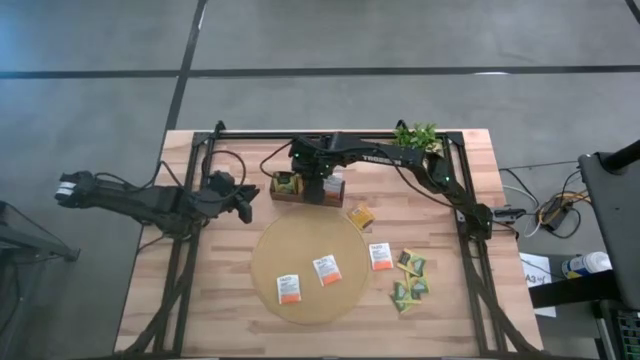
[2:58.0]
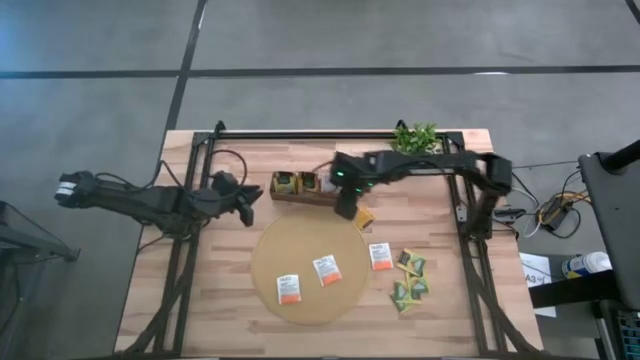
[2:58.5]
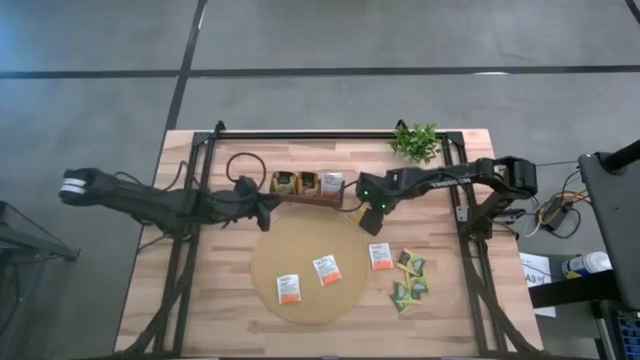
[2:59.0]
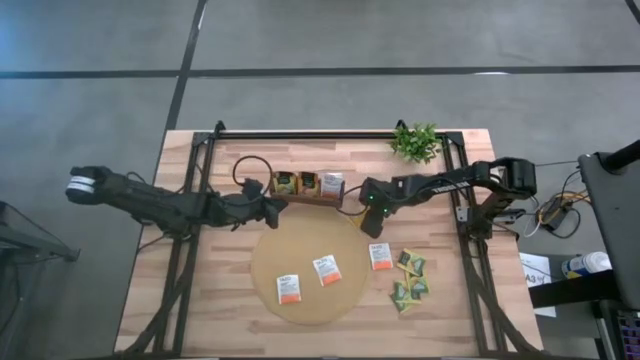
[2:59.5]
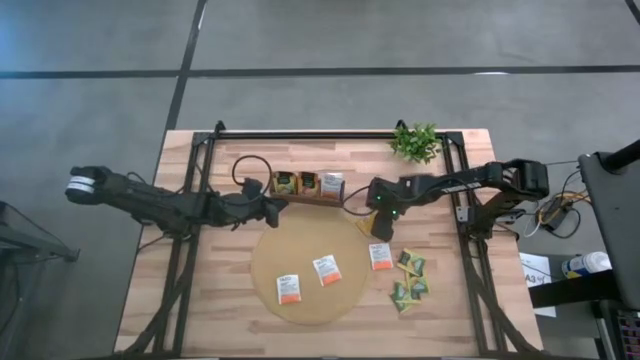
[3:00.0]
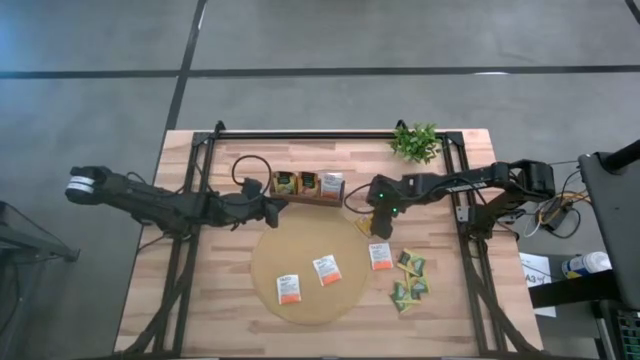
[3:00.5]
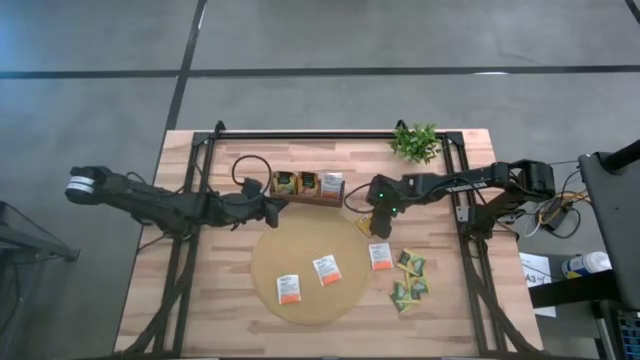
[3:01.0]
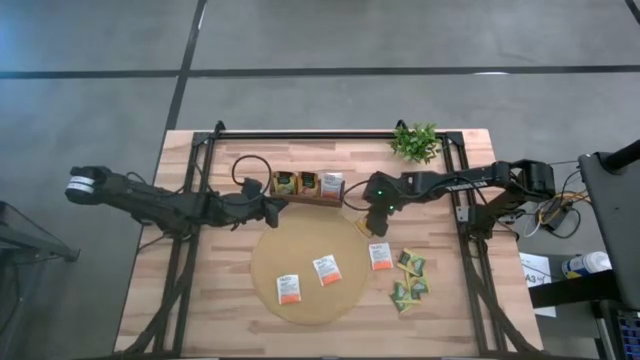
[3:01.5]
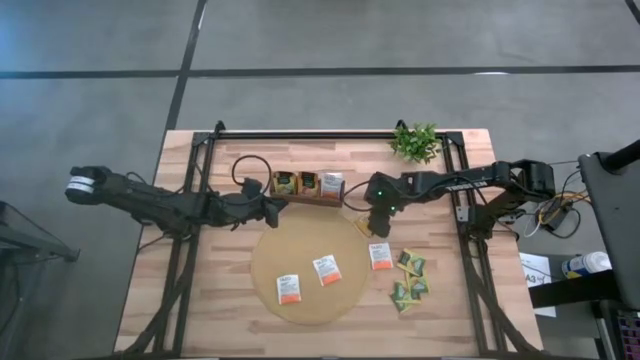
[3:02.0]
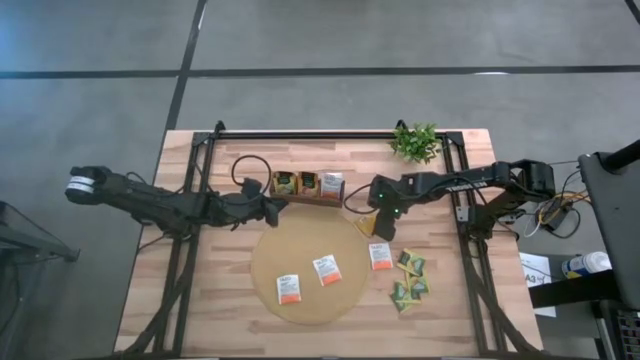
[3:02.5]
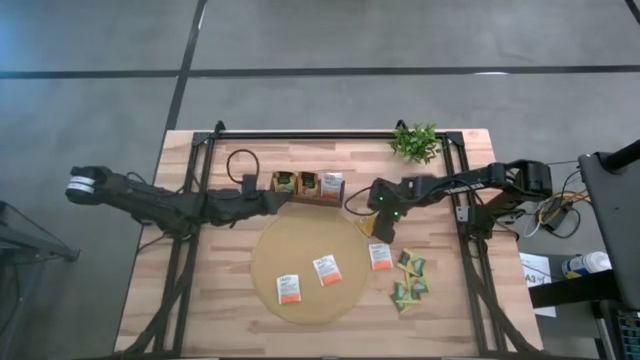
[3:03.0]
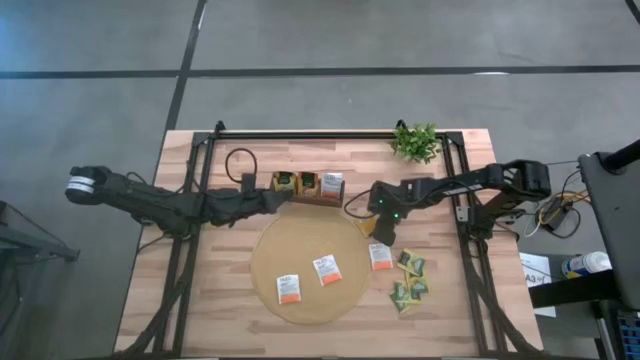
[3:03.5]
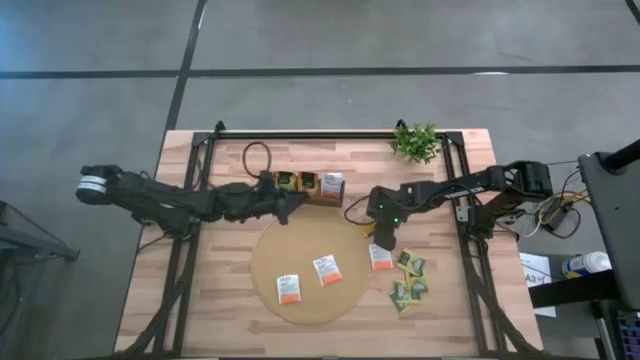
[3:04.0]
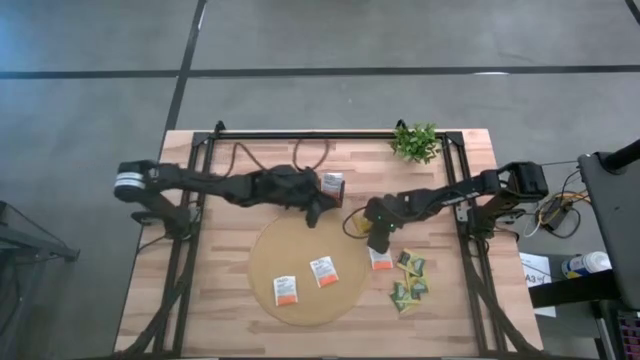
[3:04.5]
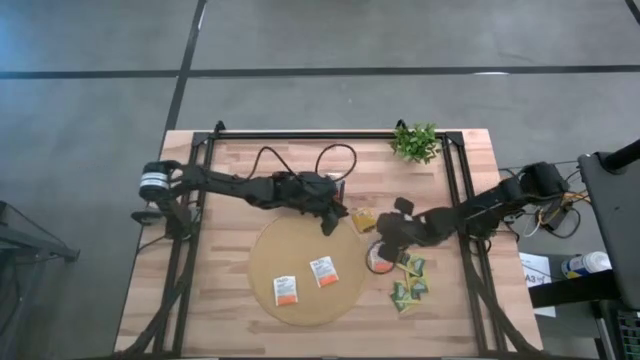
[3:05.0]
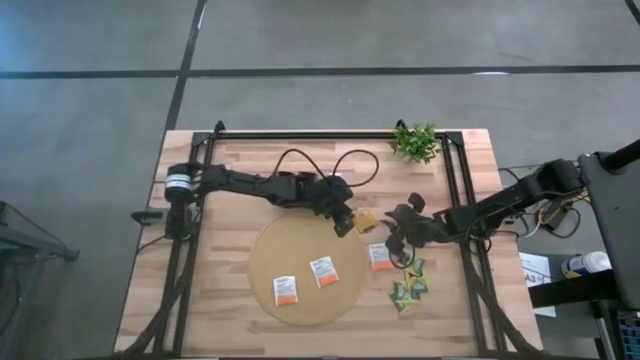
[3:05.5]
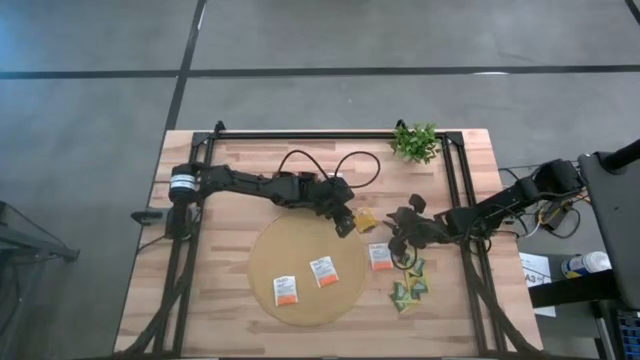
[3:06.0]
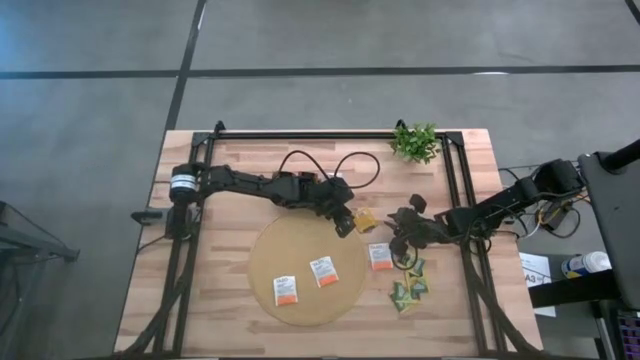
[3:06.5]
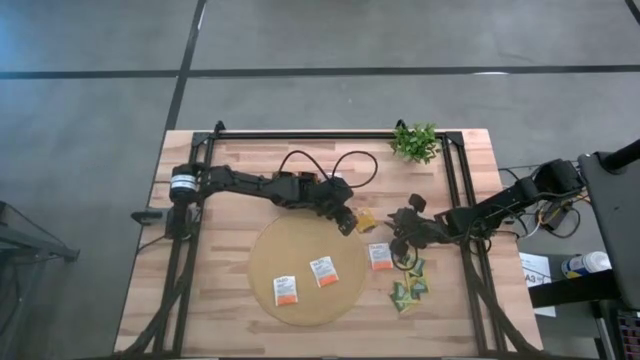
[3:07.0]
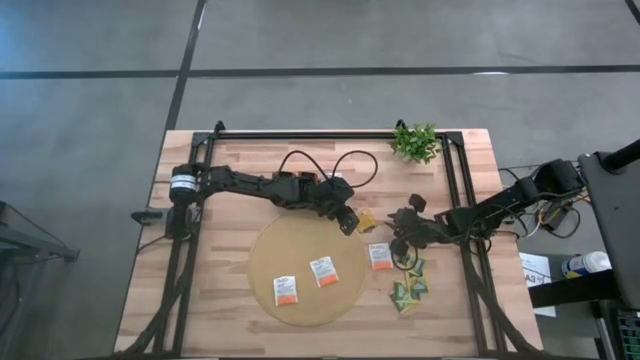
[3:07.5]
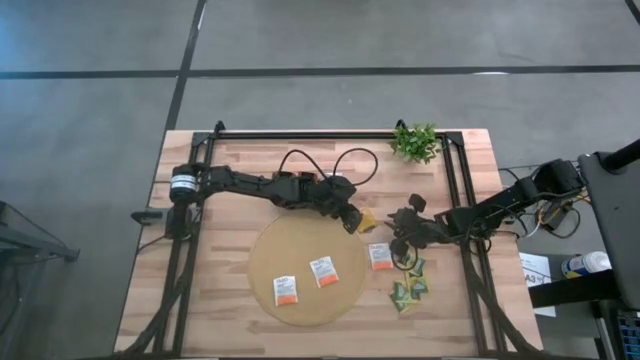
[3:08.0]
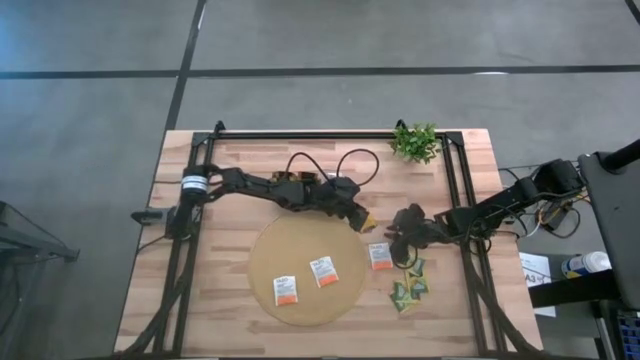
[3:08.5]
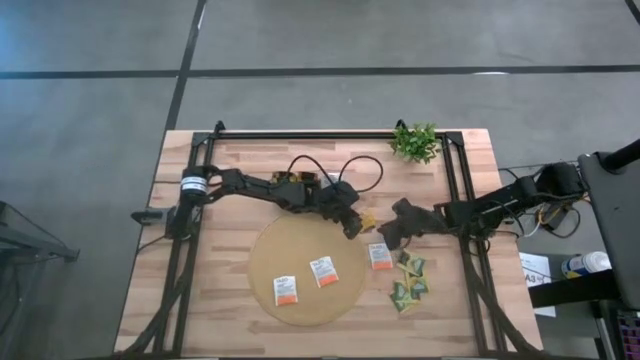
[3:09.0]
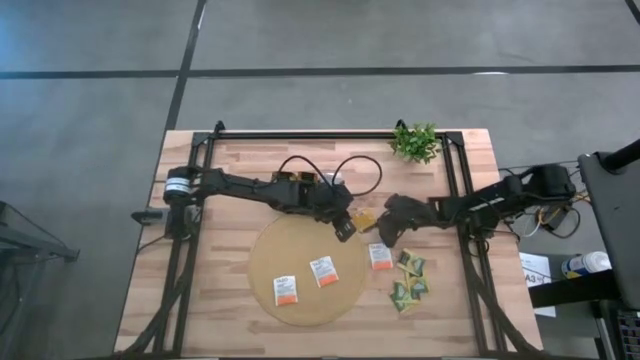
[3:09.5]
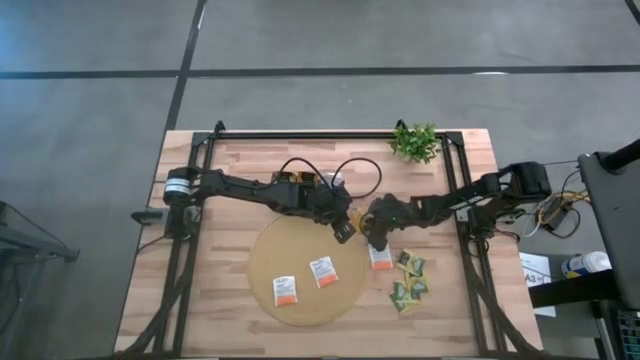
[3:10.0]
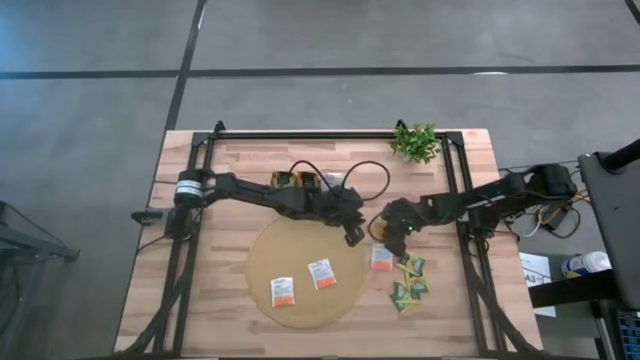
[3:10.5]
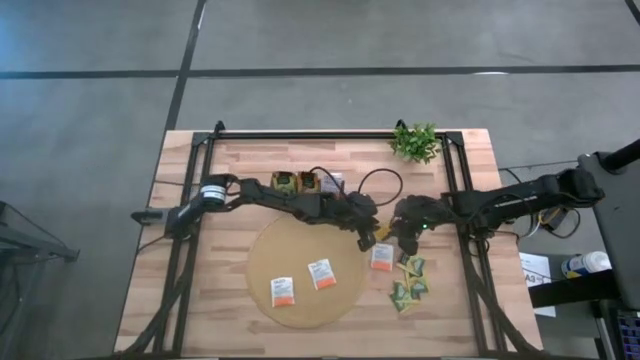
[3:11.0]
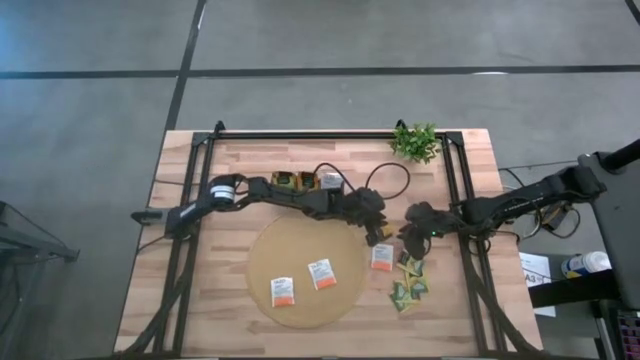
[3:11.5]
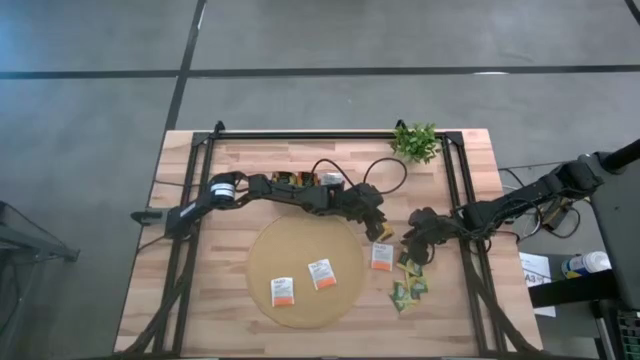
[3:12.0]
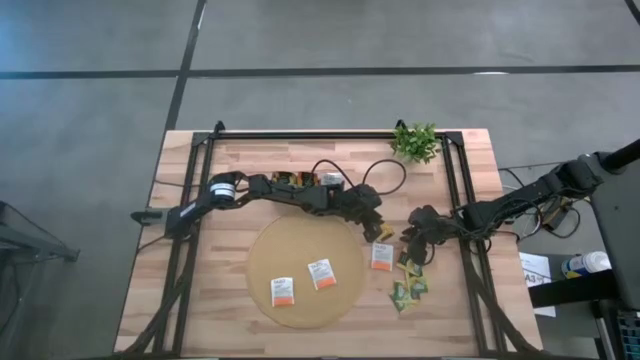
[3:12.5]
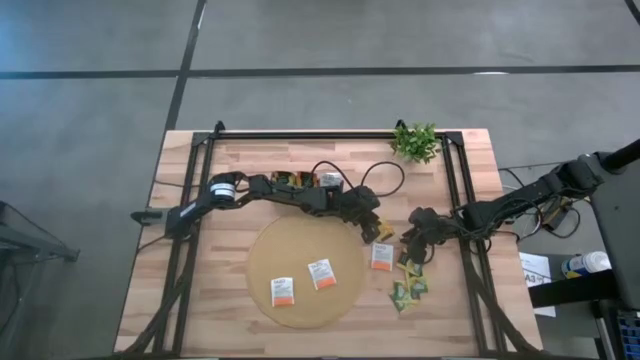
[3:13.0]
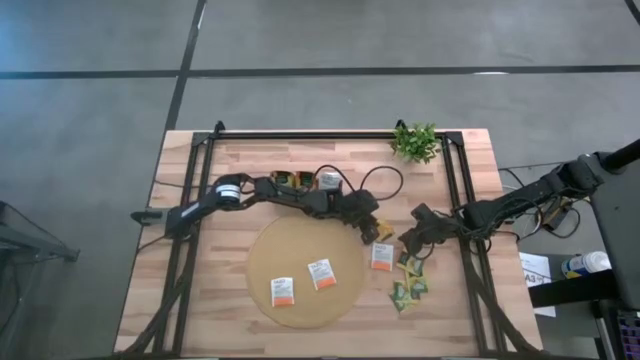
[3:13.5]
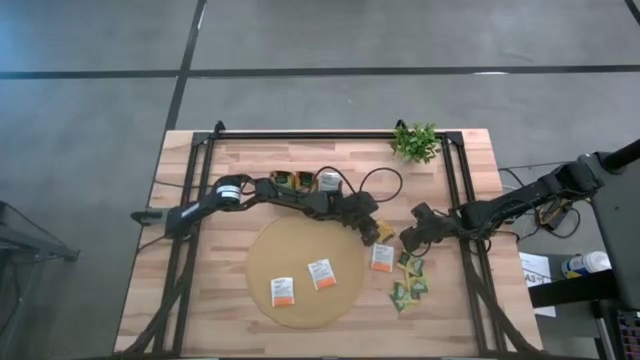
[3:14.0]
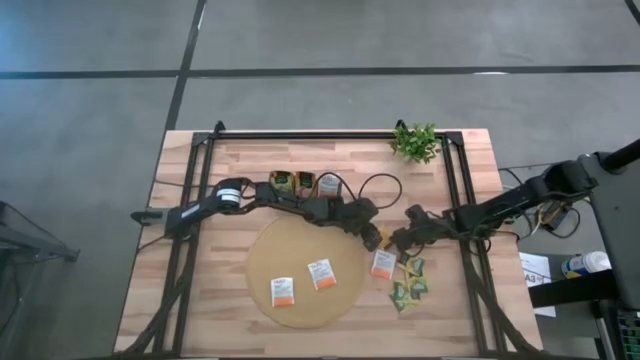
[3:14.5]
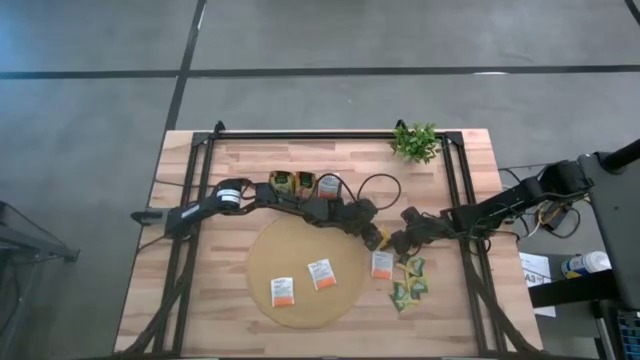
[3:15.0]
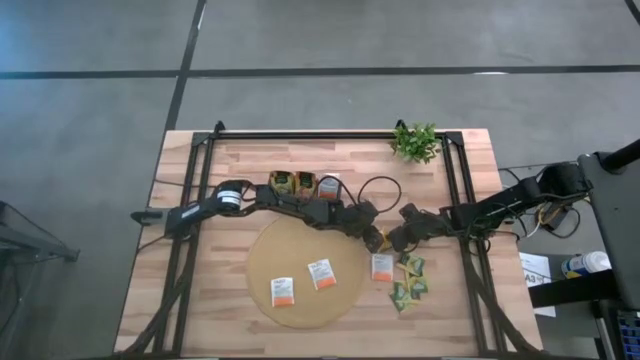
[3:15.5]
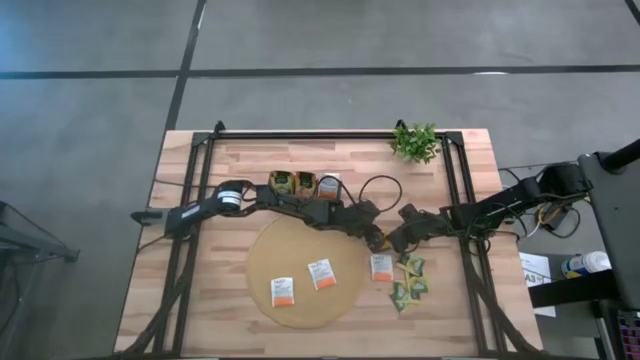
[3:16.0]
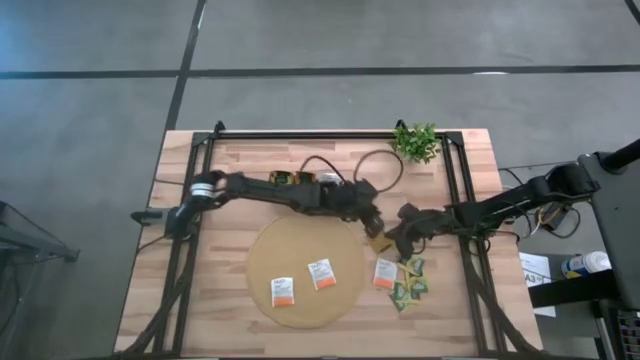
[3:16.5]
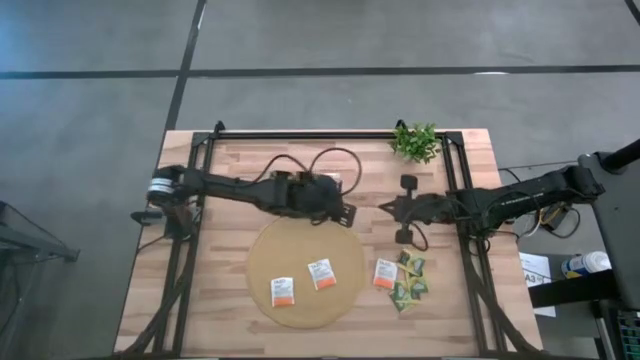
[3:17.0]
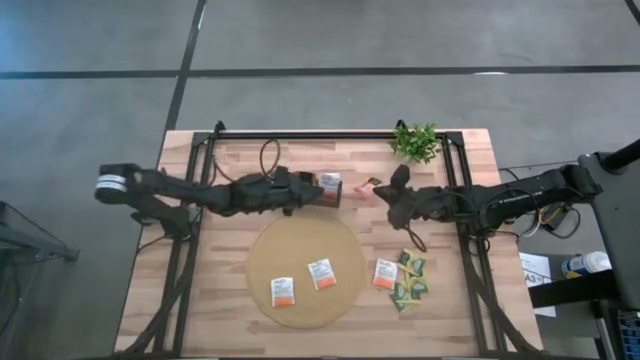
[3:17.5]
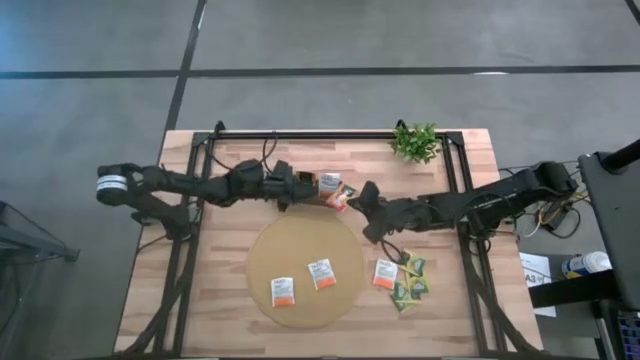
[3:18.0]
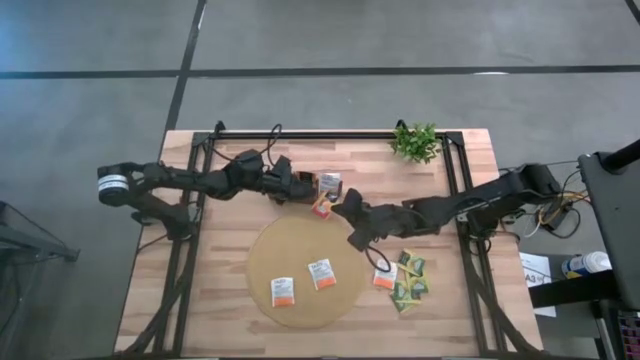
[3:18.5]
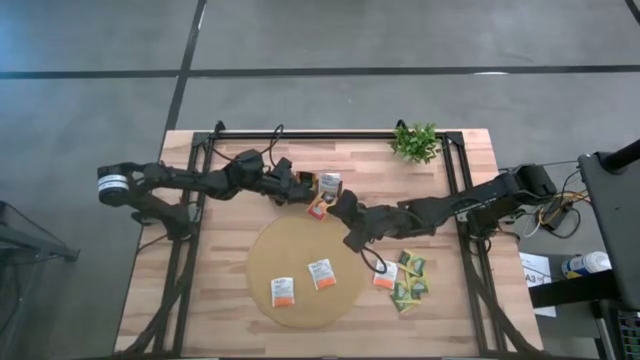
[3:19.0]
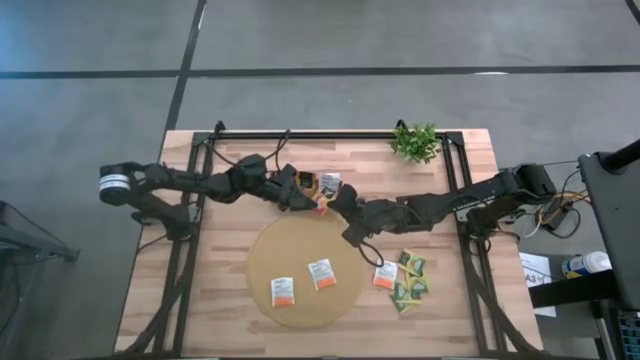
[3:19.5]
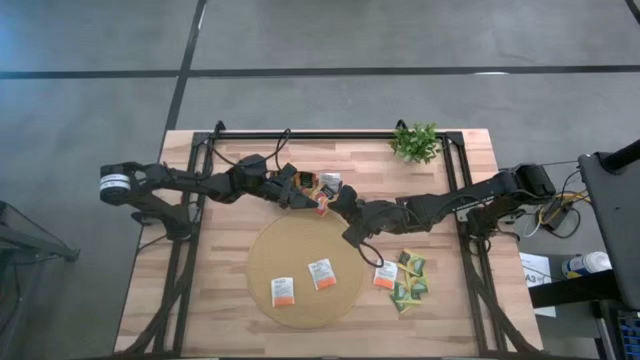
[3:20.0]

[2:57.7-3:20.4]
Task: Pick & Place Tea
Put the yellow tea bag into the middle section of the wooden organizer
